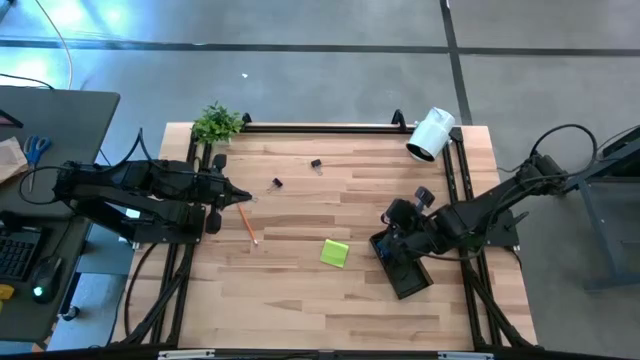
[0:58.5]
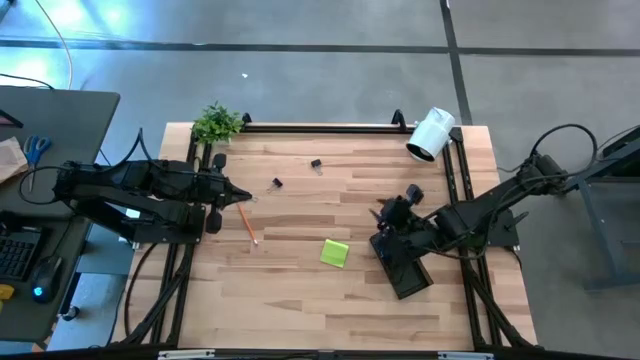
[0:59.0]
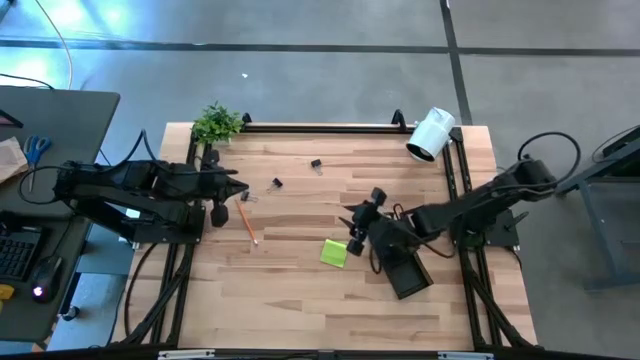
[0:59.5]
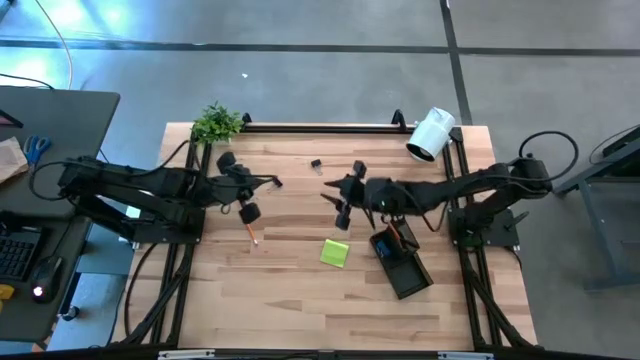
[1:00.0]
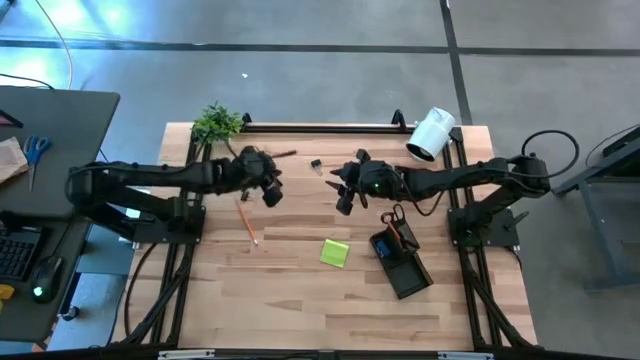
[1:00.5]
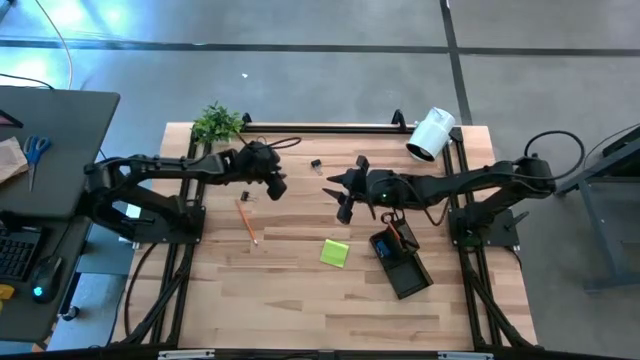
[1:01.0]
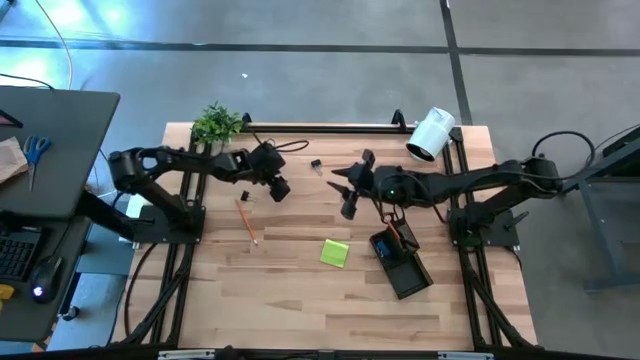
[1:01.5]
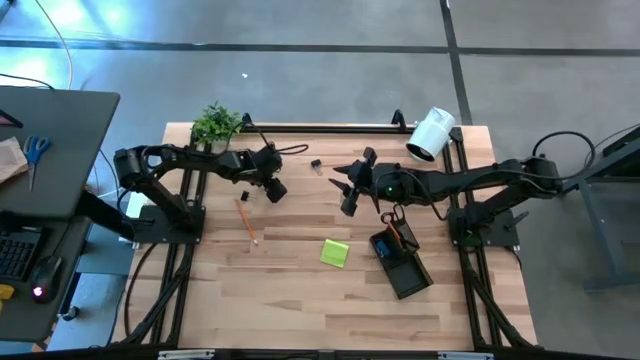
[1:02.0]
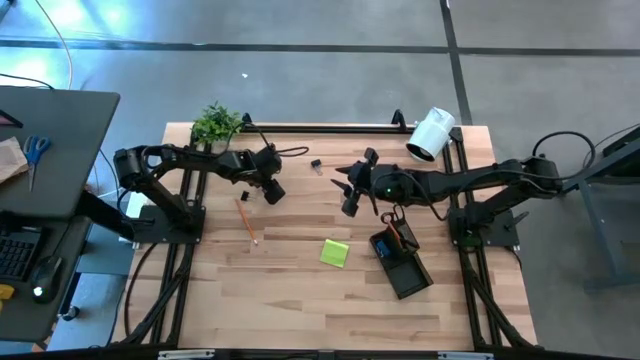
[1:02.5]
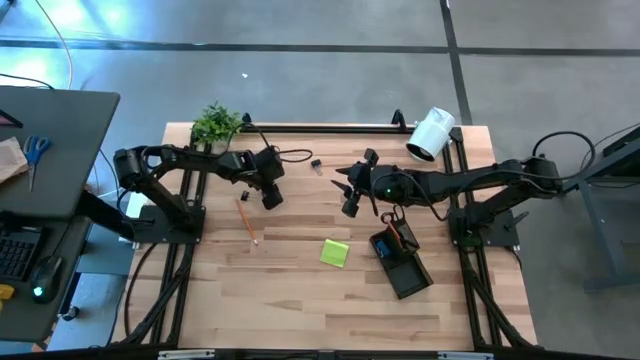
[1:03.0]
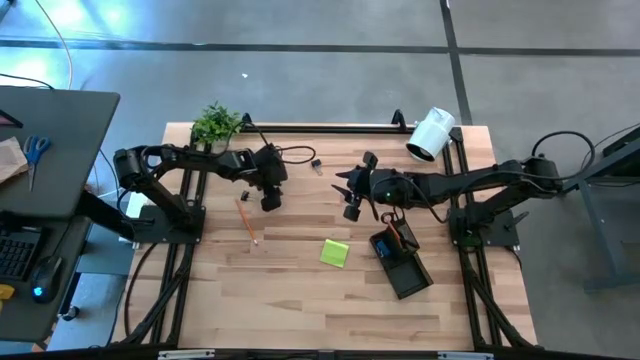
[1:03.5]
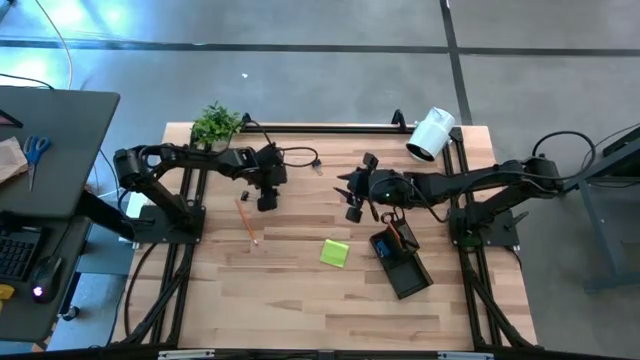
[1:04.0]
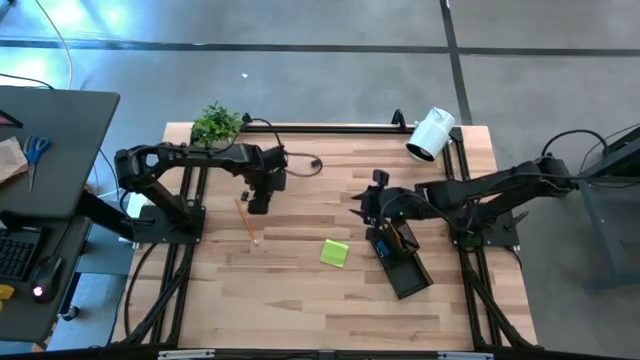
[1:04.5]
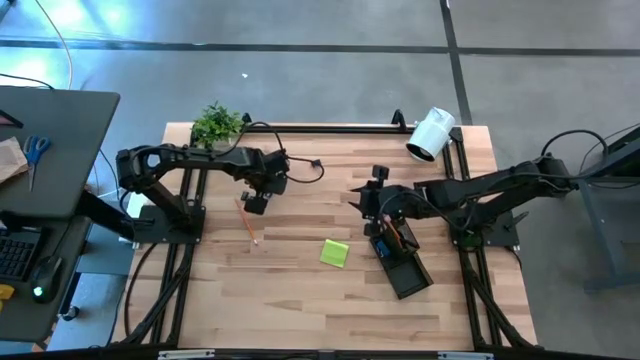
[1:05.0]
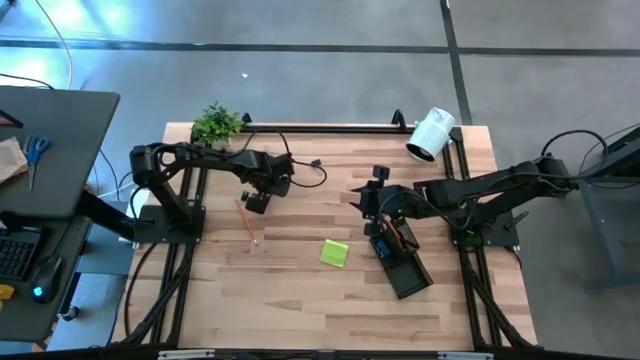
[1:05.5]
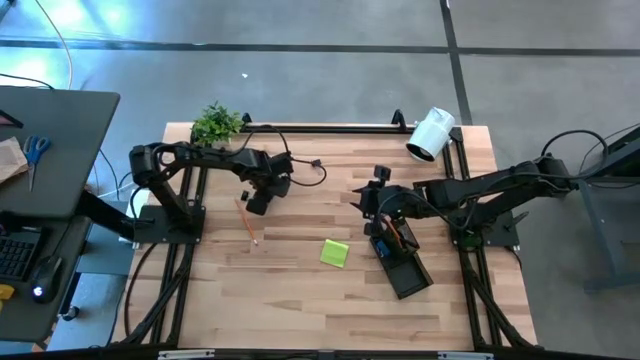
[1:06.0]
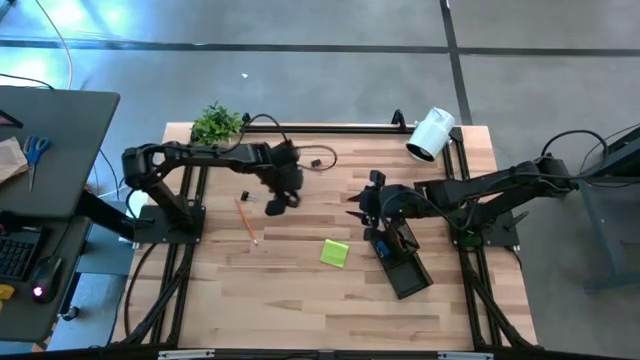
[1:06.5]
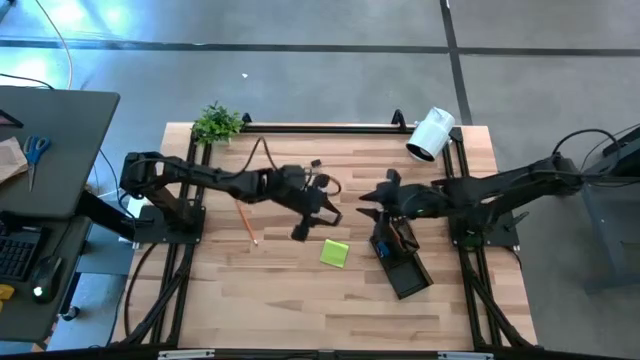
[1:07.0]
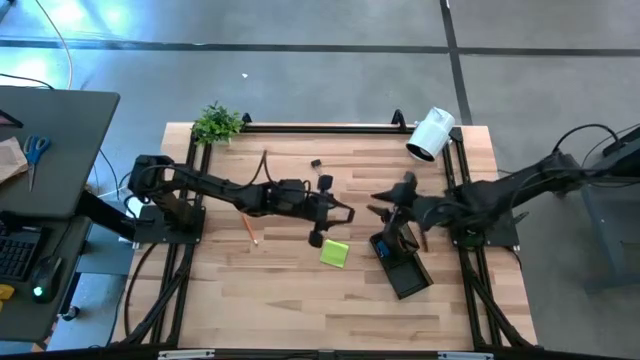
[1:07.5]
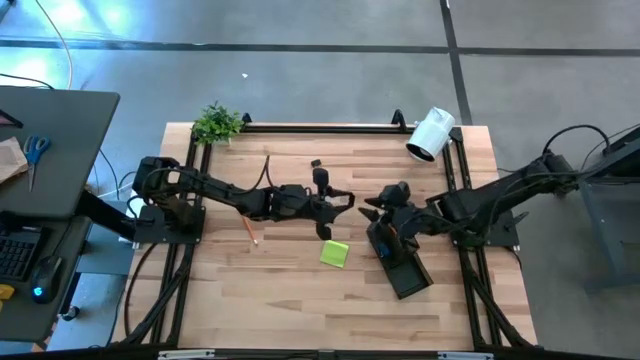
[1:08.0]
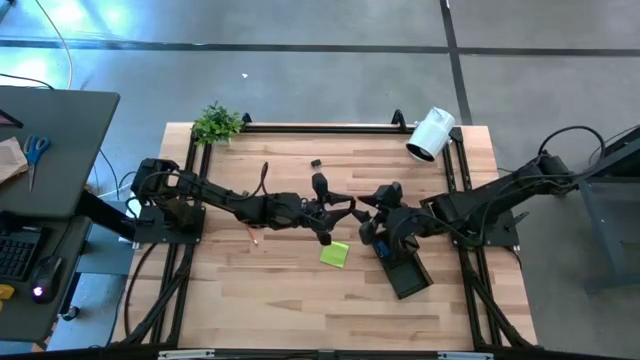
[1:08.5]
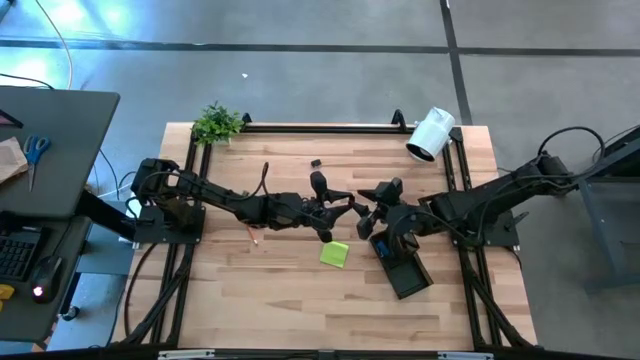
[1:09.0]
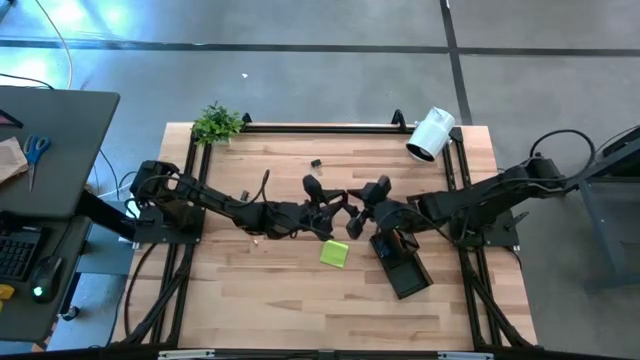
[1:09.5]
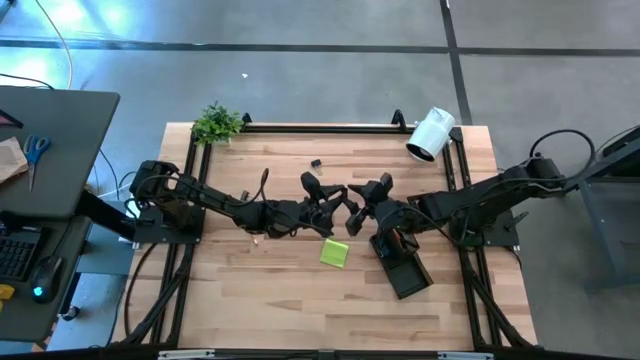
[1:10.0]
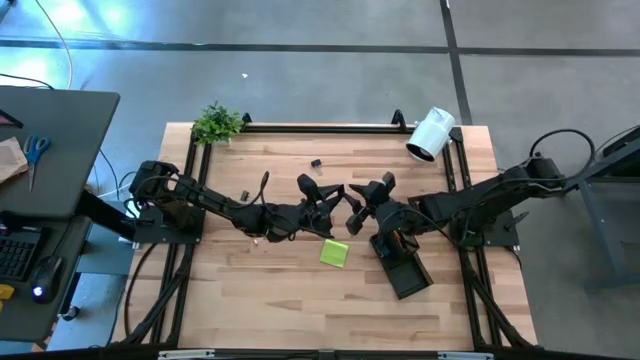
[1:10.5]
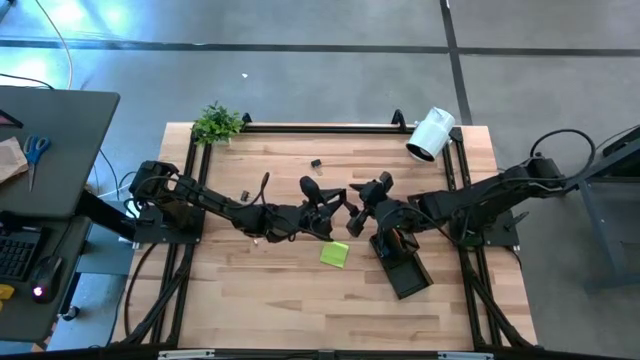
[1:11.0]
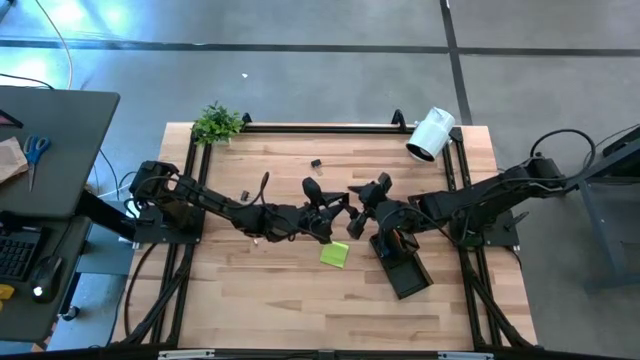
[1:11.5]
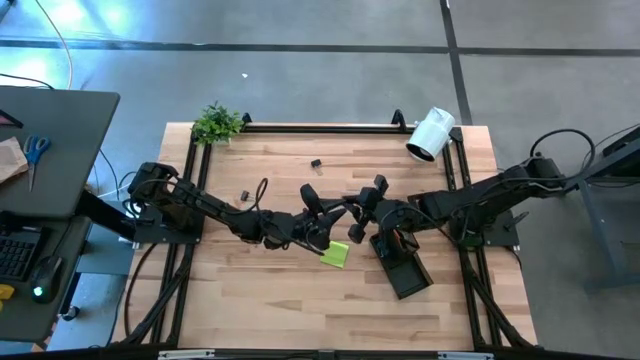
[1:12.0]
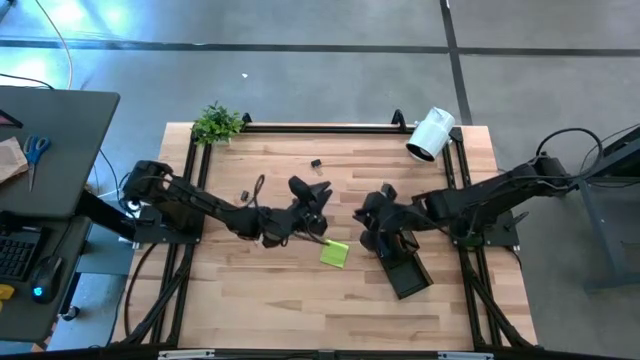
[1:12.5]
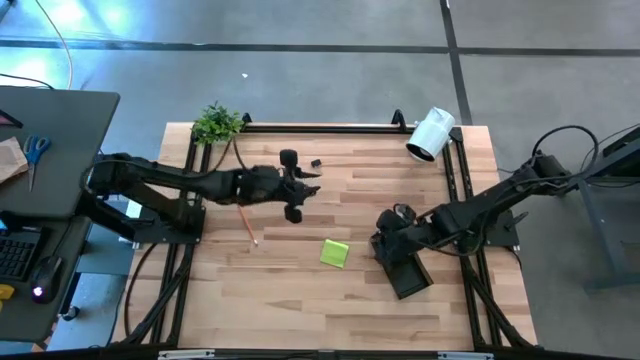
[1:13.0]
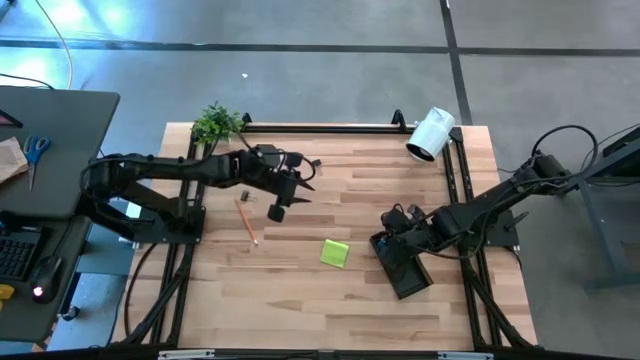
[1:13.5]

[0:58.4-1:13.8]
Task: Pick and place office supplies into organizer
Put the black binder clip into the black desk organizer

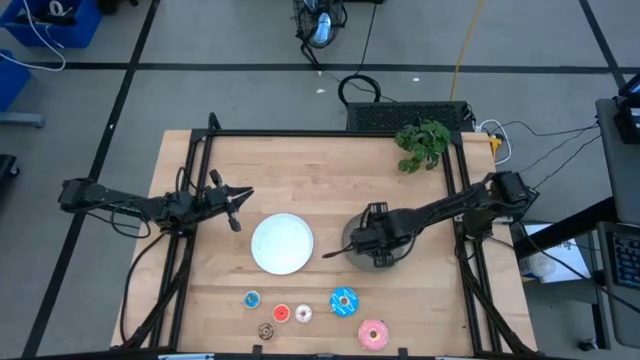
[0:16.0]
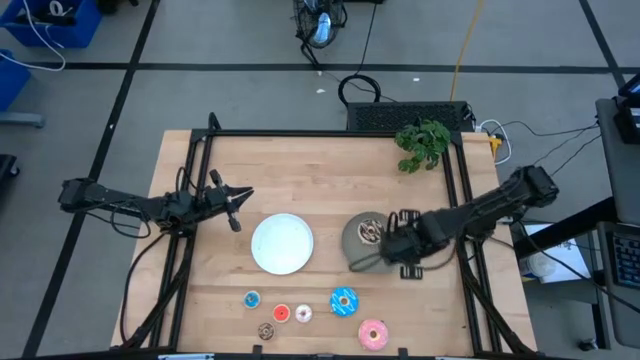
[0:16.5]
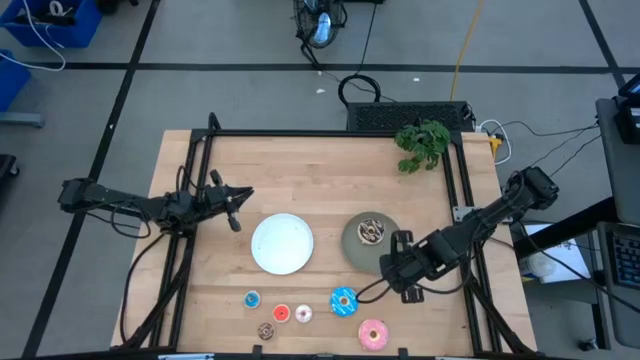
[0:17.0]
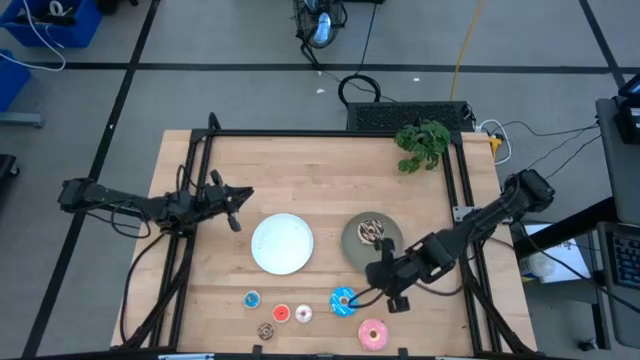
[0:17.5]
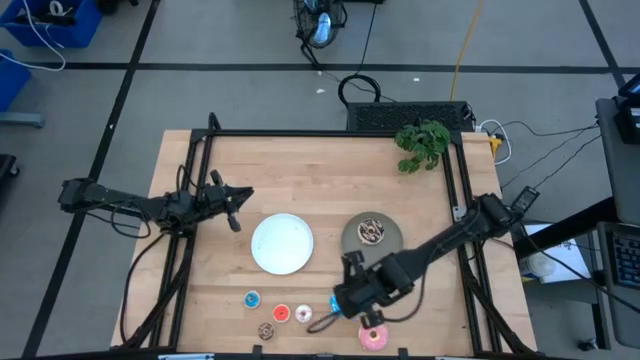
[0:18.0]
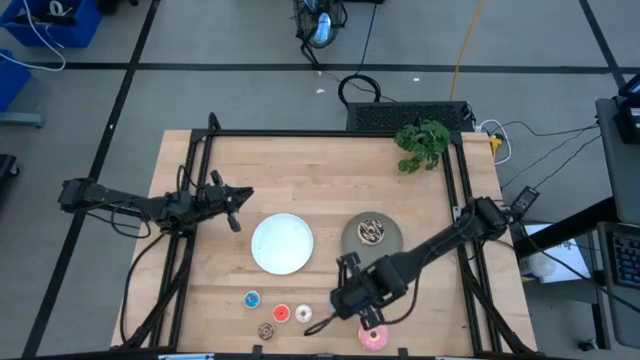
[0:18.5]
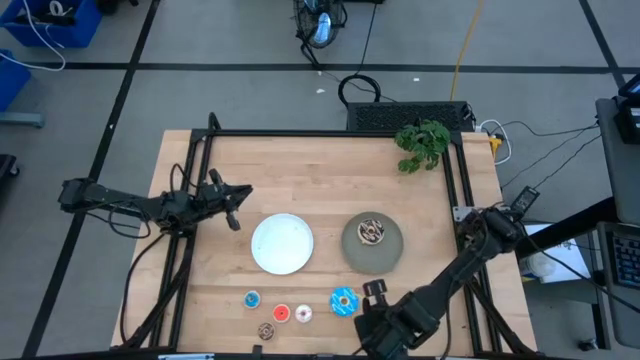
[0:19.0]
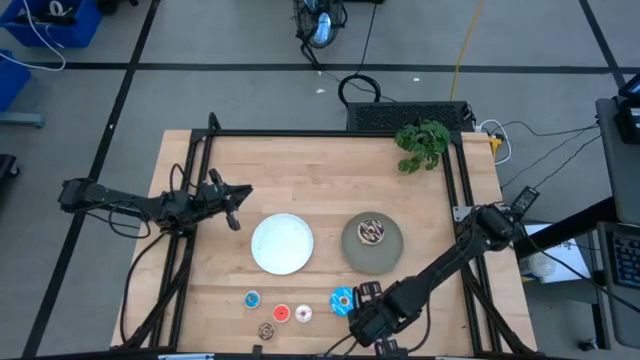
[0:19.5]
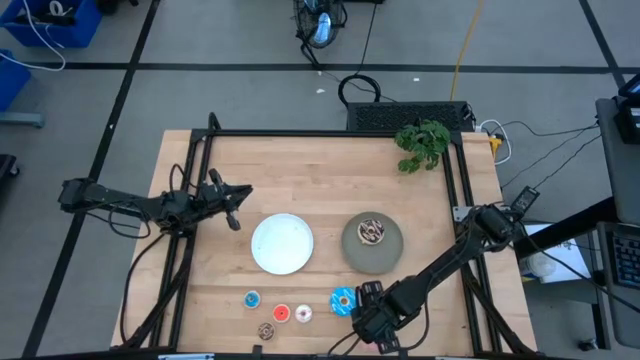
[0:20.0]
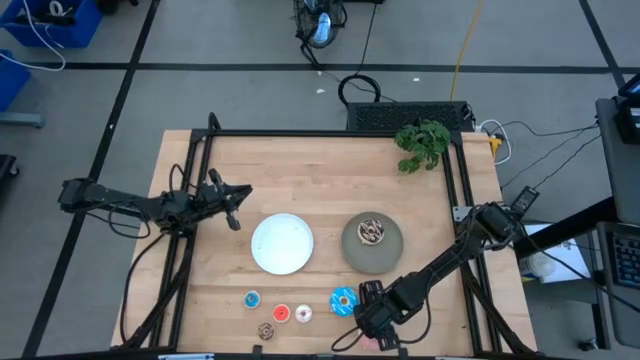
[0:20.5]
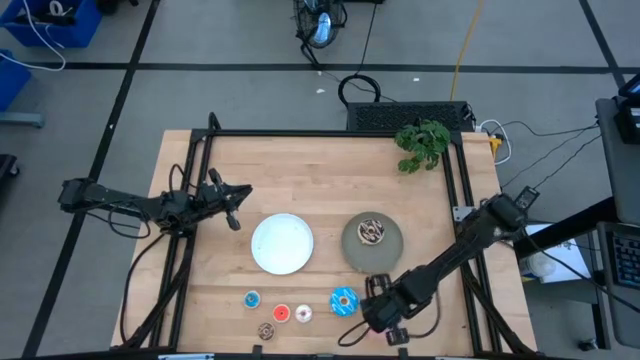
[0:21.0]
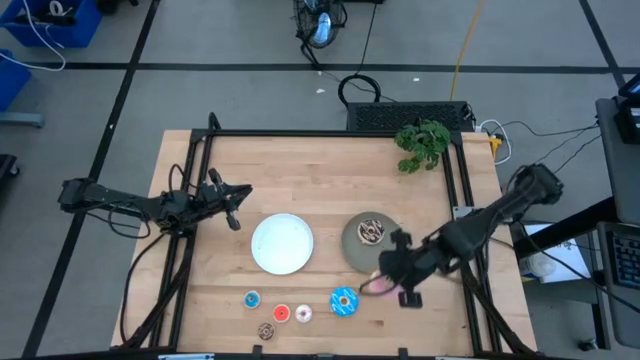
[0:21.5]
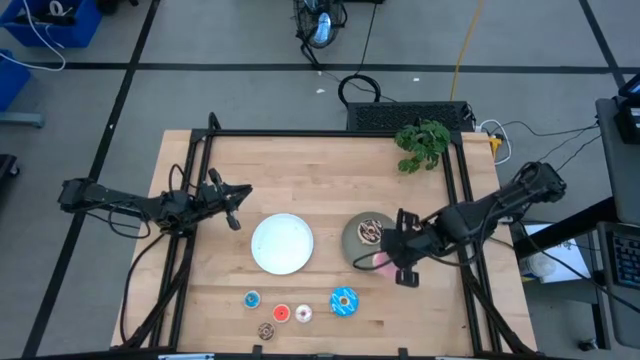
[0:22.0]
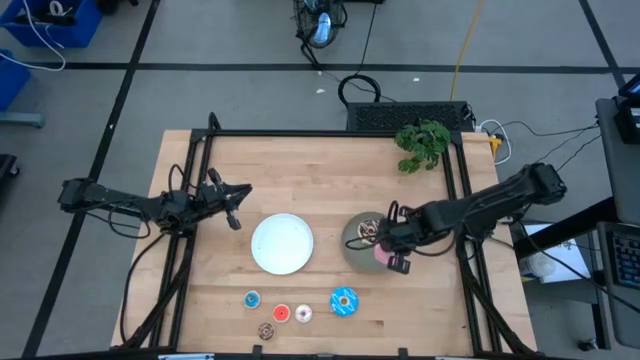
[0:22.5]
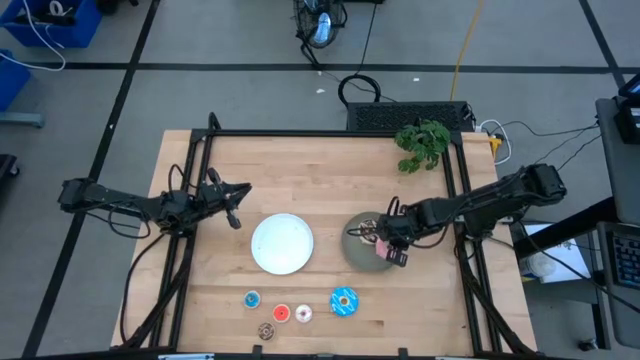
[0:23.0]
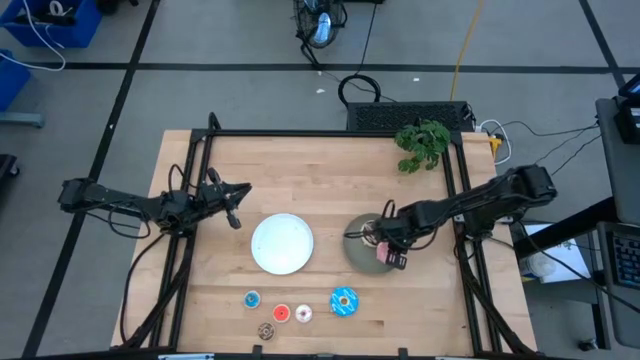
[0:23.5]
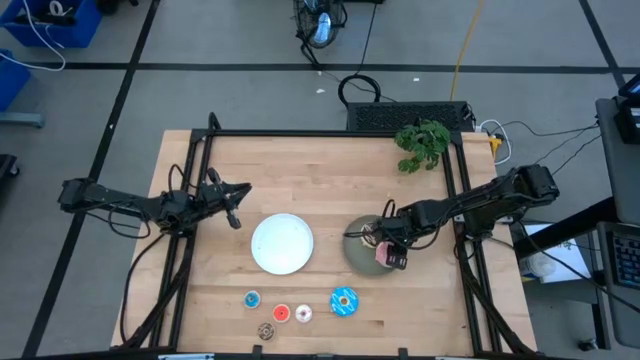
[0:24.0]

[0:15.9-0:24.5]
Task: Pick & Place donuts
Put the large pink donut on the gray plate
